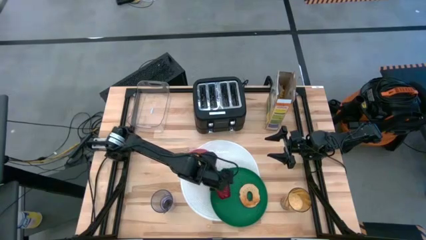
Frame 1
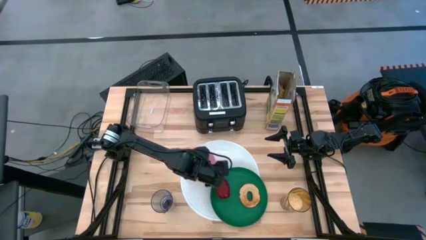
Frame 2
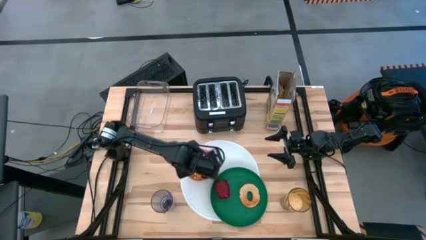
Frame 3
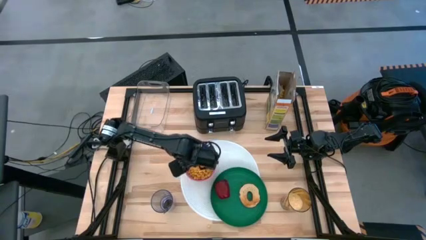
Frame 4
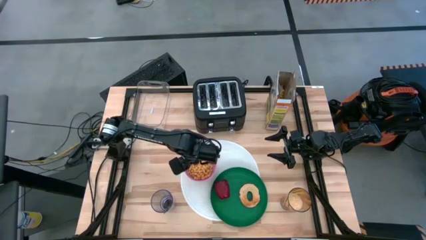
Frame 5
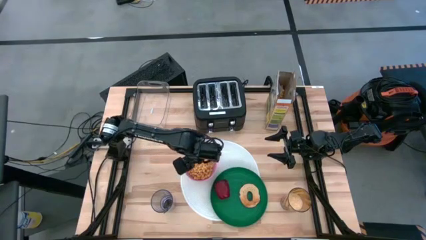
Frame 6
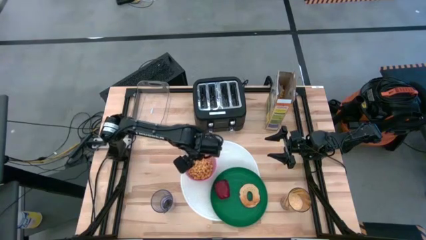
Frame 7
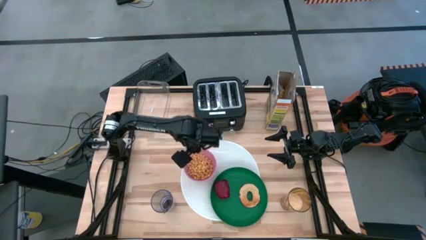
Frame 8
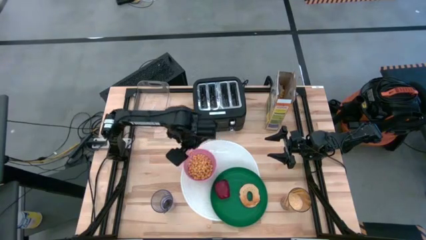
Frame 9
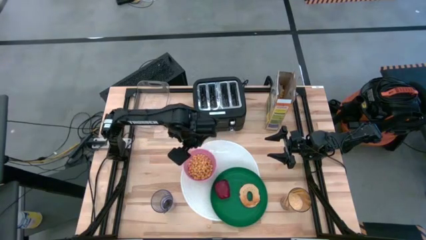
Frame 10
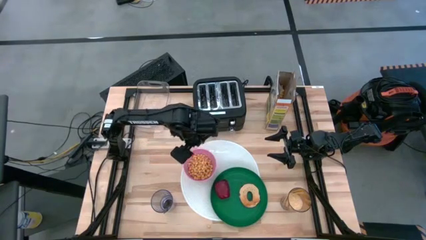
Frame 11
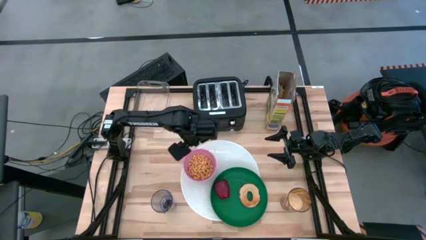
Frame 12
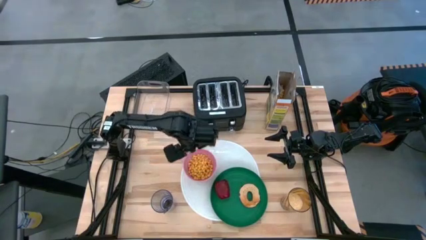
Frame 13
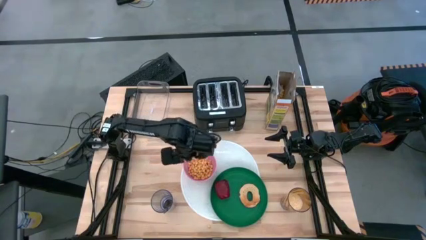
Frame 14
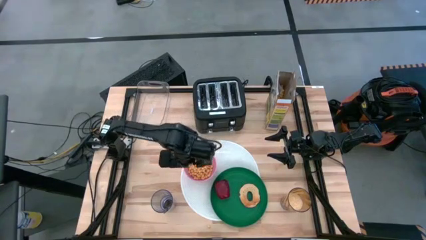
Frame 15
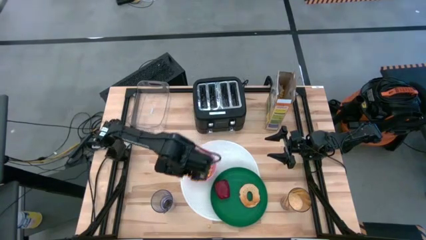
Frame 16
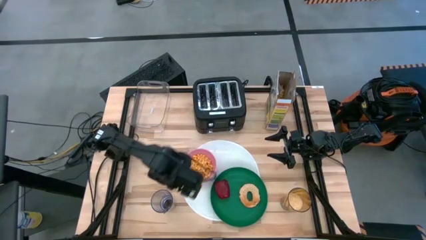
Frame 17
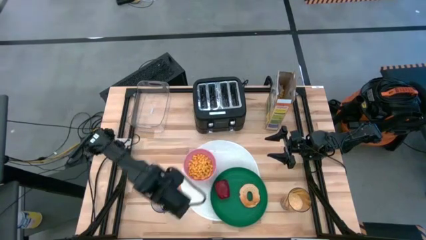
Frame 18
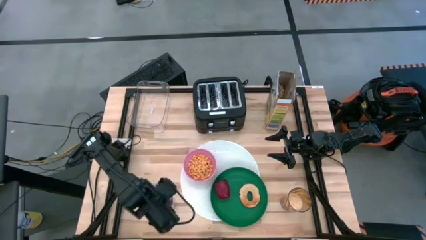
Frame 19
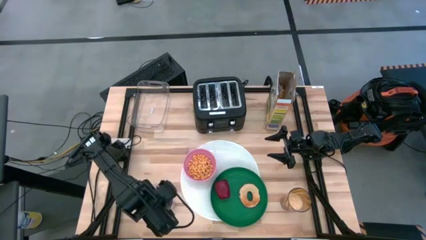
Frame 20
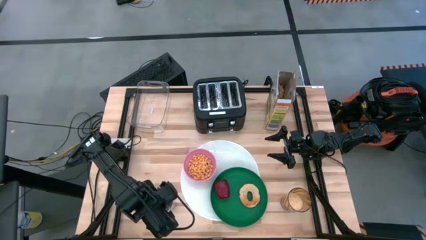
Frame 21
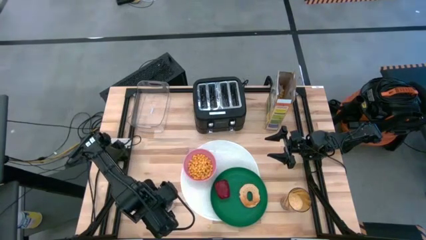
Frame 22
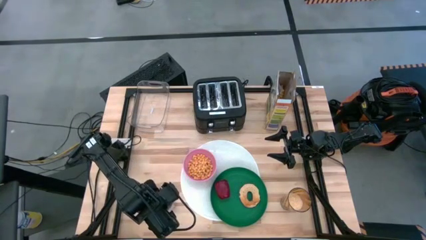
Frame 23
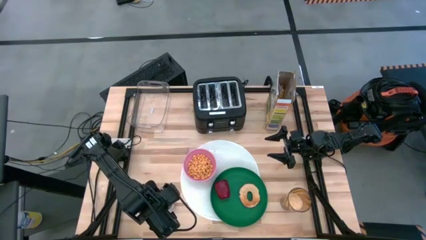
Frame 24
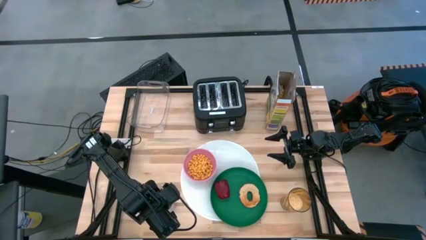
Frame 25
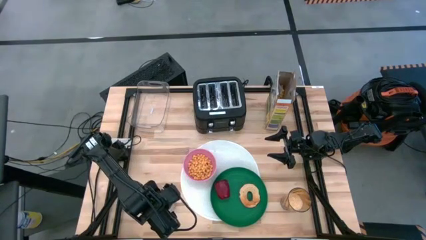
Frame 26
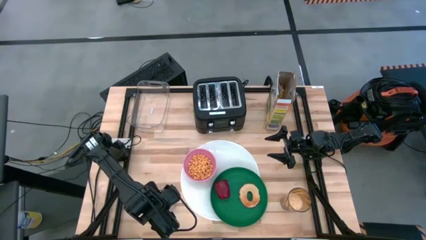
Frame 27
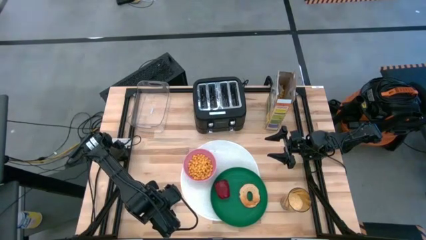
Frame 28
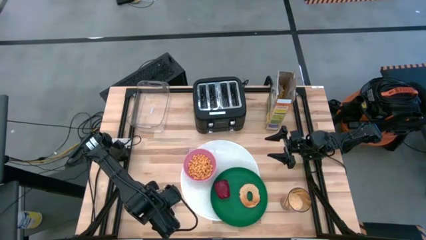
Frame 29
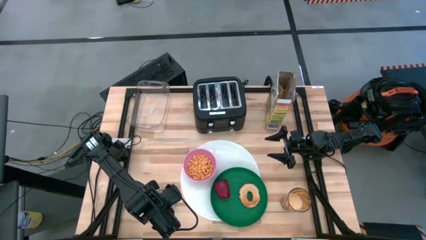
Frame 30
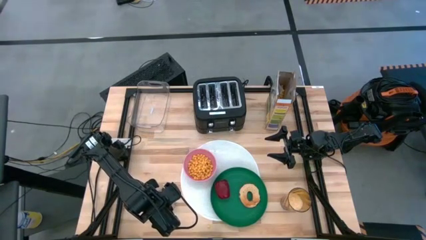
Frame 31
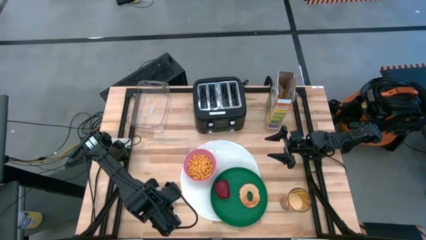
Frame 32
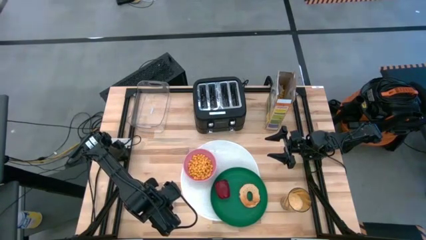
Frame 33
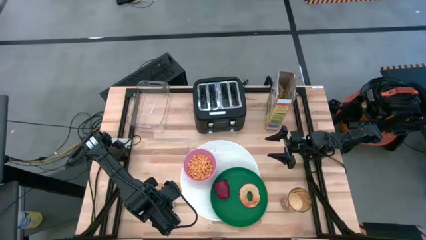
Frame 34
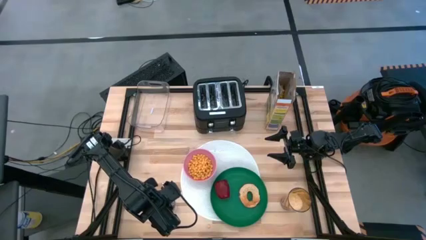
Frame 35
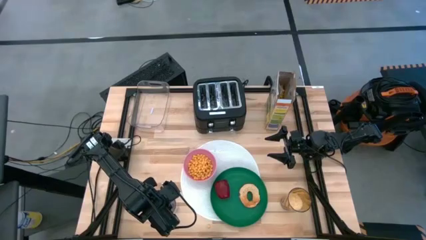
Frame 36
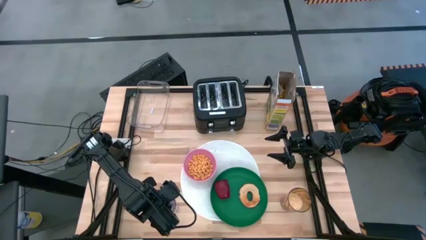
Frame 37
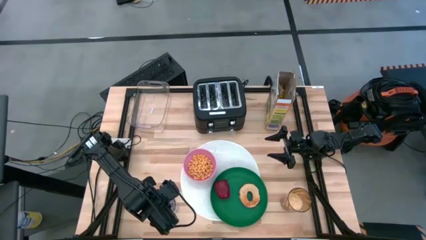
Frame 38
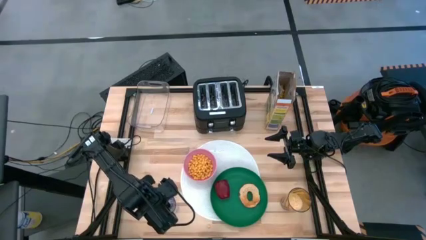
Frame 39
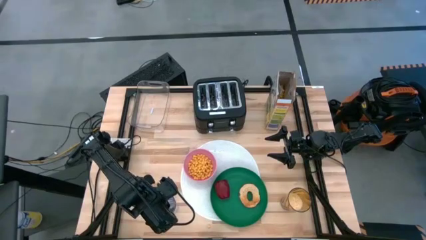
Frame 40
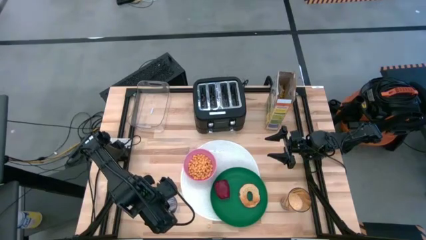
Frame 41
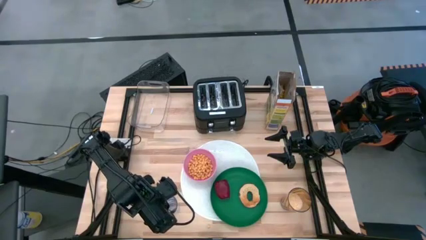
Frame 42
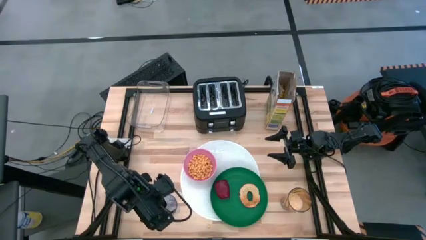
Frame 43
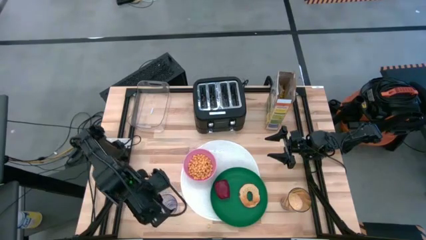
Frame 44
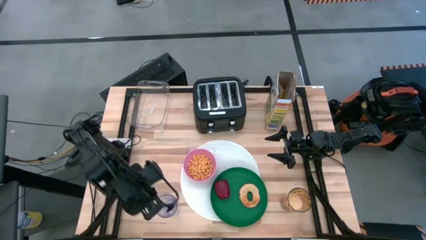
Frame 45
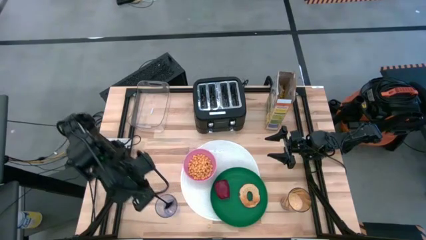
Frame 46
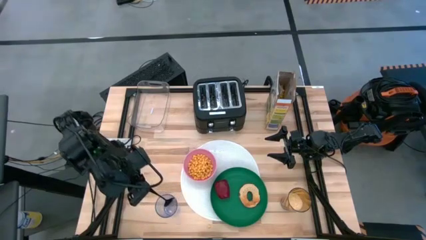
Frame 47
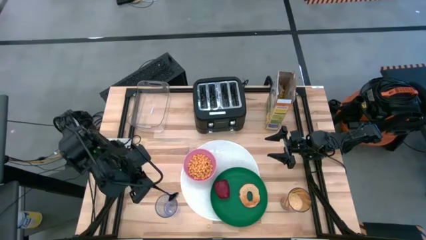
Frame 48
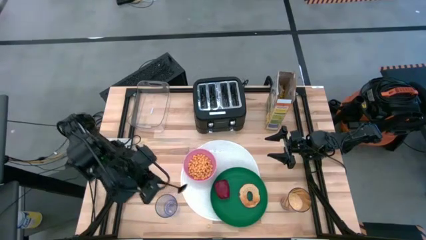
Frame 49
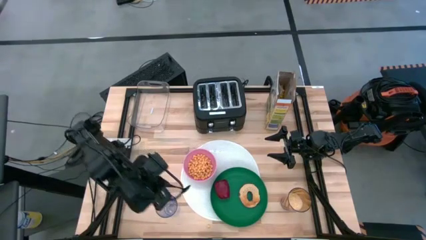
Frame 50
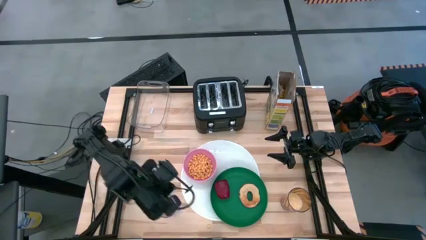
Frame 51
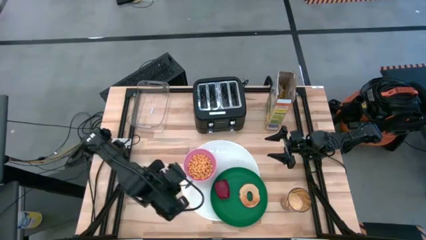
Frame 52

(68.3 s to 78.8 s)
Task: Arrange a breakfast setting
Put the silver spoon on the left side of the white table mat

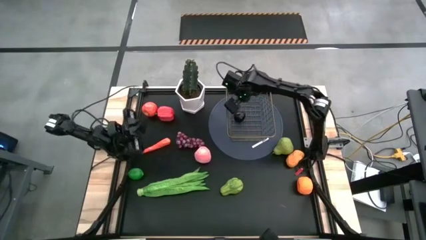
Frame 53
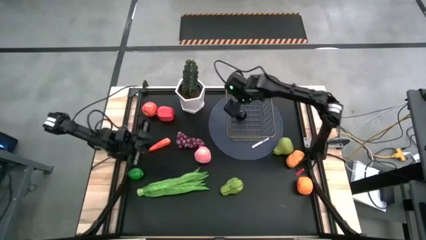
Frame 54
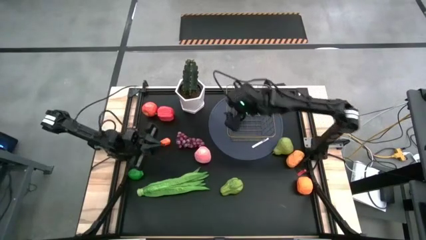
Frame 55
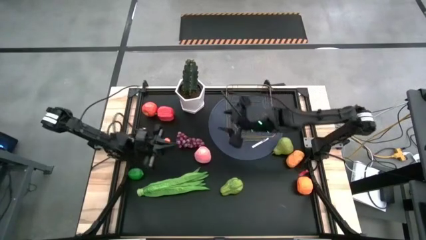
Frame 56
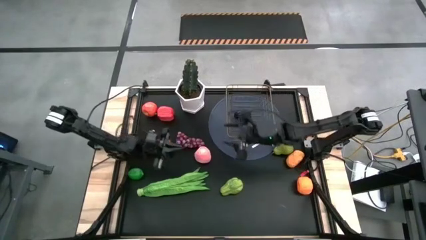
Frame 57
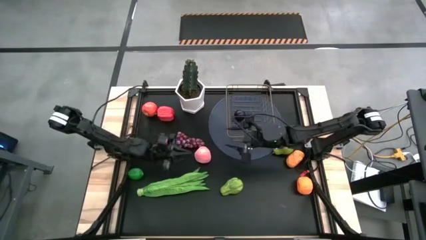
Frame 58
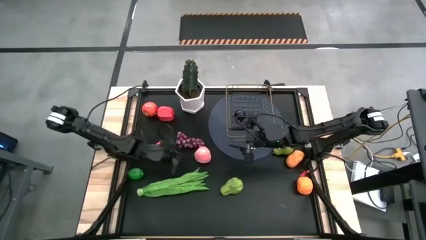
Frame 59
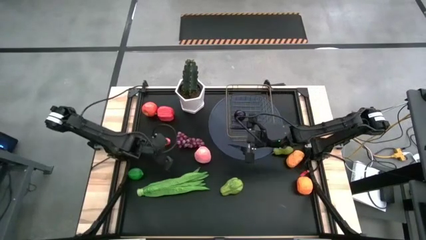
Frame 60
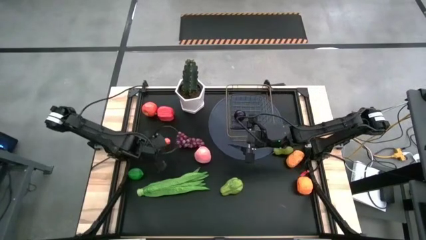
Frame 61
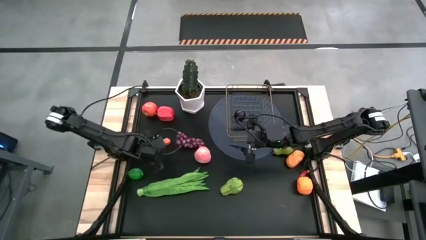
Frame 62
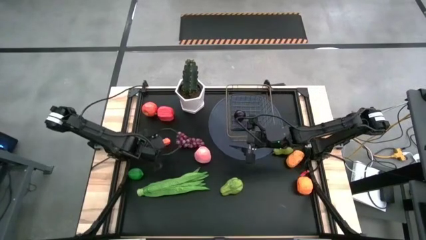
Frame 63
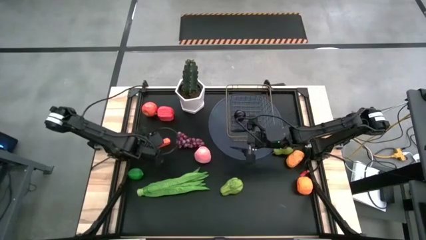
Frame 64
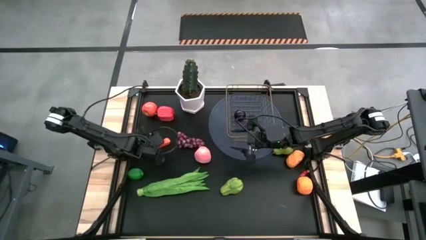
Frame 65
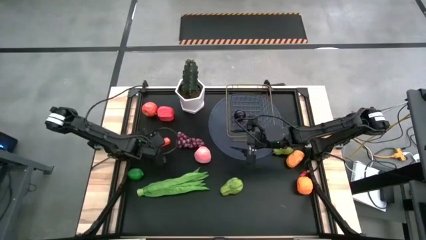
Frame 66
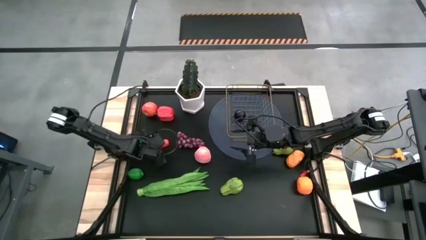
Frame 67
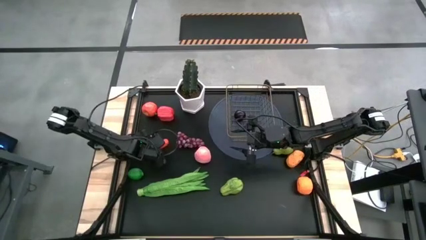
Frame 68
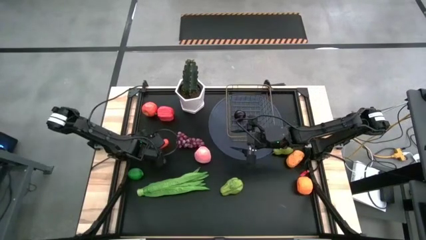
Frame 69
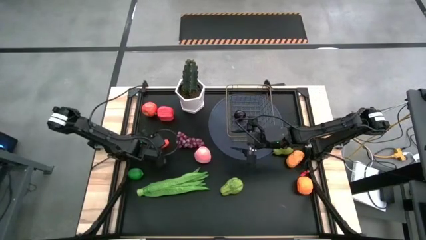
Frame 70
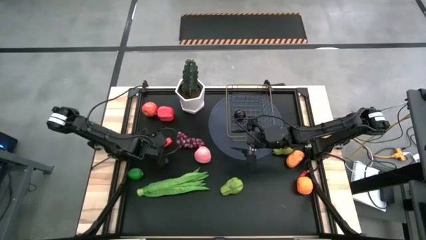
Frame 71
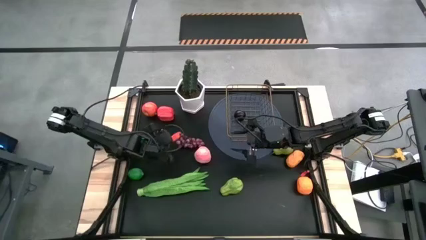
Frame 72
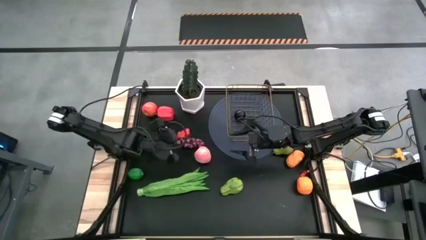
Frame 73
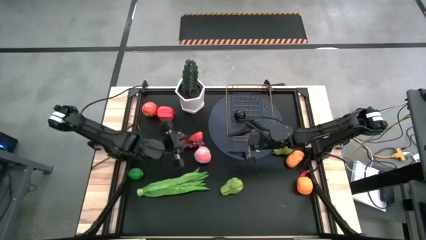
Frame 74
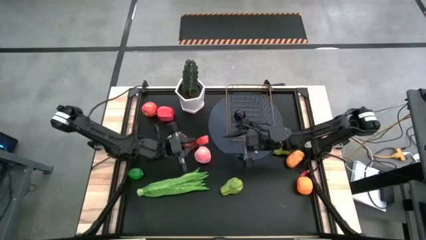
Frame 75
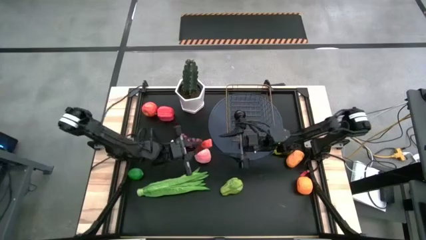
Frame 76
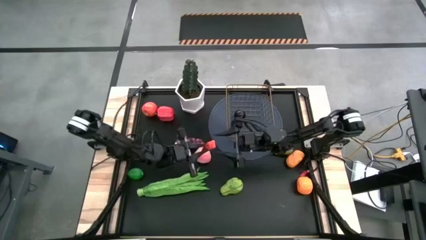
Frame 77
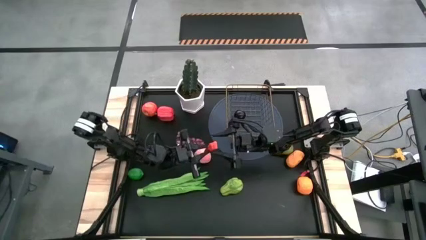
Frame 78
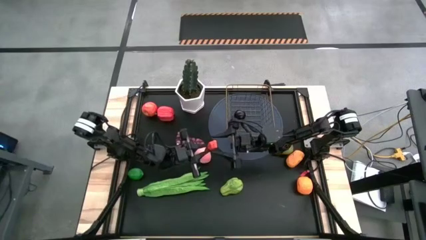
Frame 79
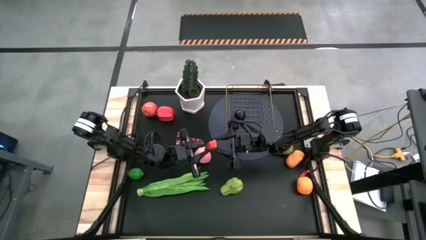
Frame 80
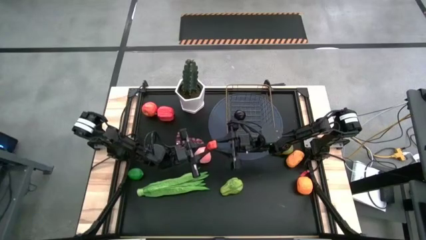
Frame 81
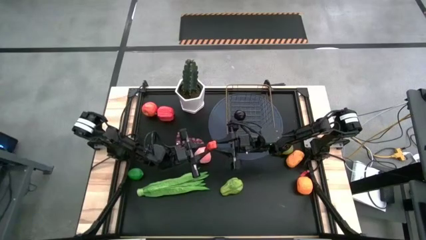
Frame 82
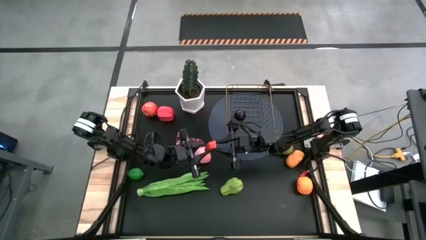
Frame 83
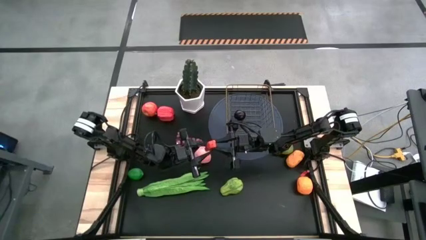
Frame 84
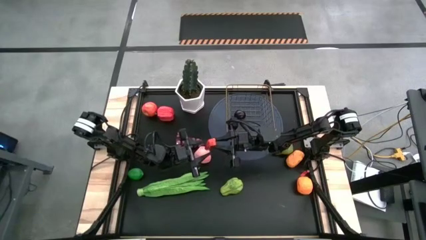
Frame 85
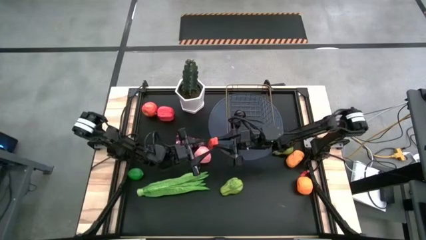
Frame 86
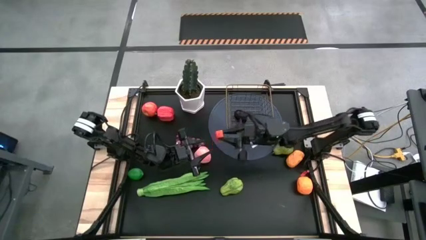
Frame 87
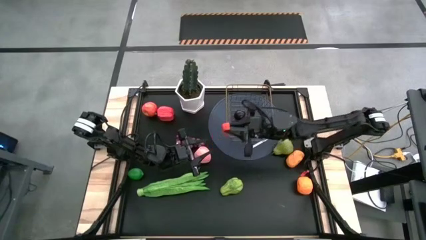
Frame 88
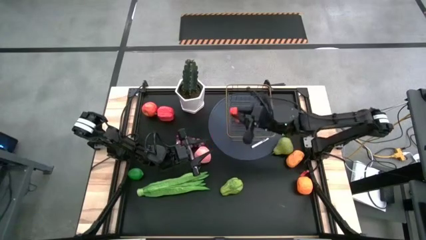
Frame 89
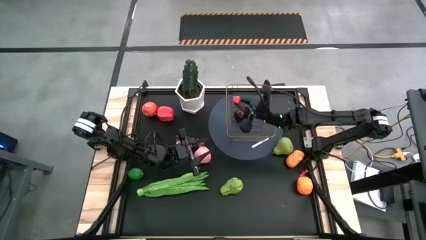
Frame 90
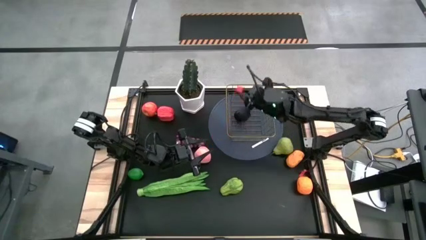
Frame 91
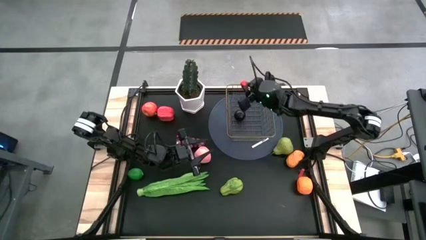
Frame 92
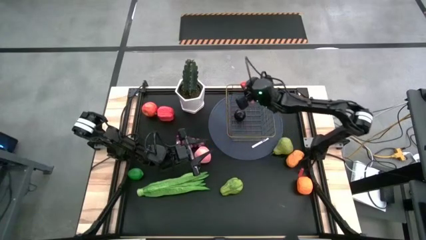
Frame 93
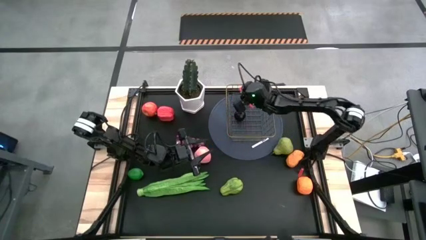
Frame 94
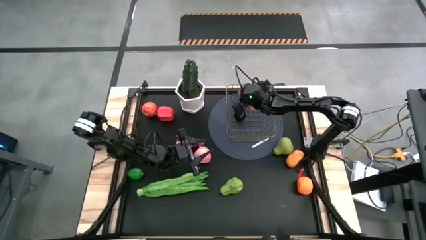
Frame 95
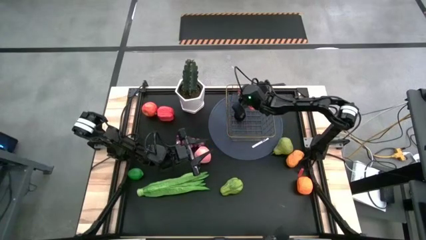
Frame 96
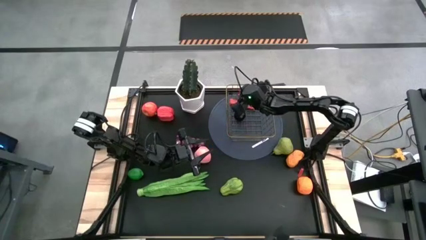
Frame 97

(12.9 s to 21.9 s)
Task: Build produce basket
Put the orange carrot into the gold wire basket
